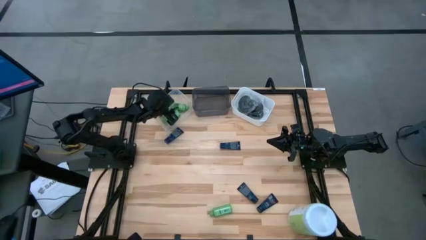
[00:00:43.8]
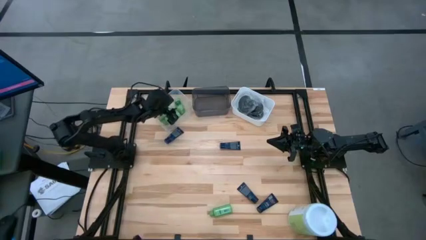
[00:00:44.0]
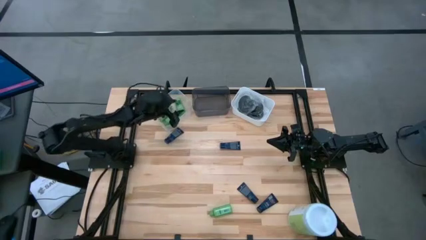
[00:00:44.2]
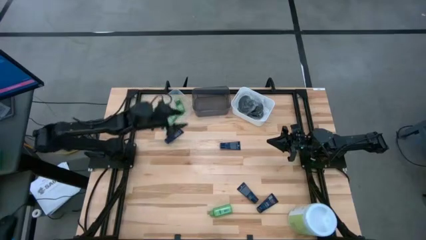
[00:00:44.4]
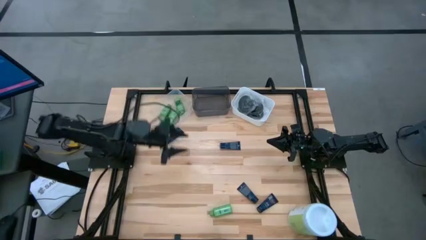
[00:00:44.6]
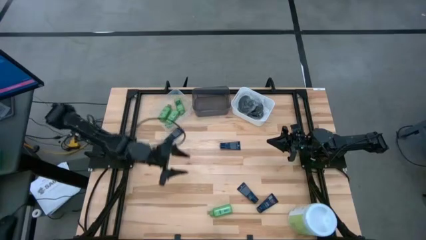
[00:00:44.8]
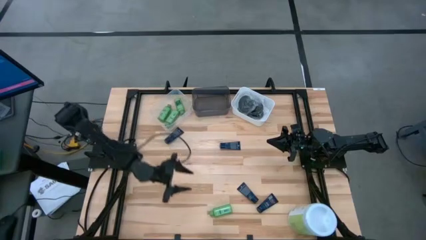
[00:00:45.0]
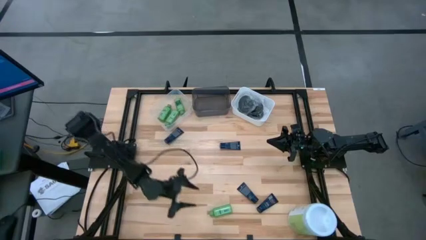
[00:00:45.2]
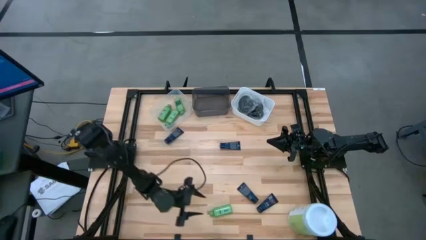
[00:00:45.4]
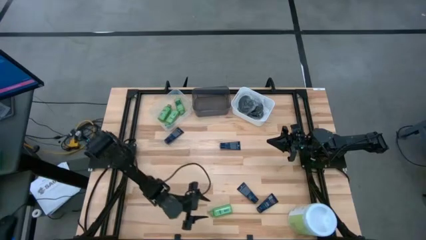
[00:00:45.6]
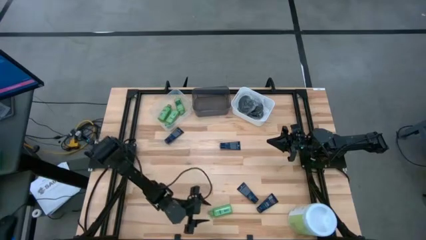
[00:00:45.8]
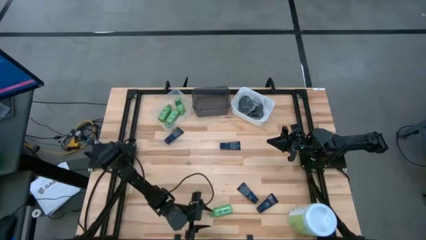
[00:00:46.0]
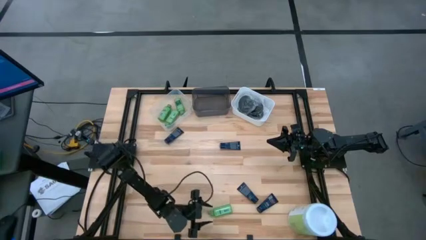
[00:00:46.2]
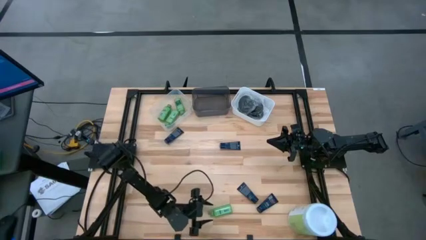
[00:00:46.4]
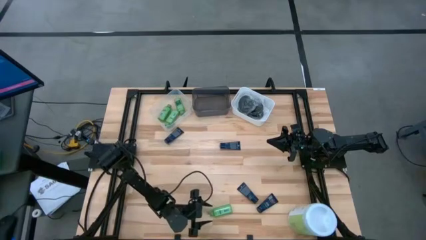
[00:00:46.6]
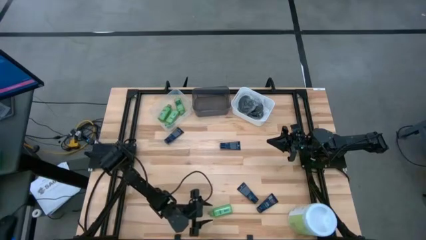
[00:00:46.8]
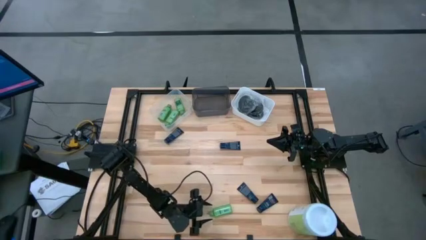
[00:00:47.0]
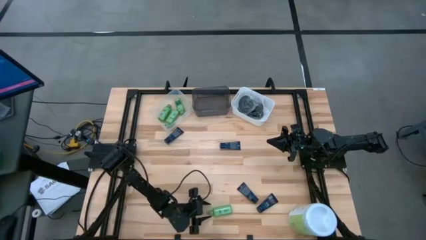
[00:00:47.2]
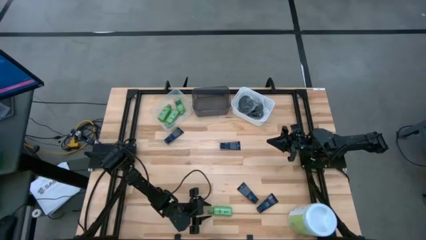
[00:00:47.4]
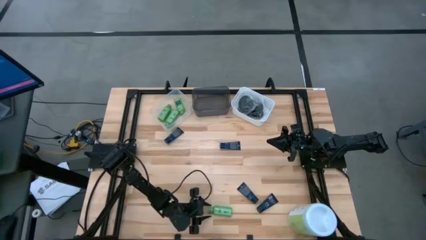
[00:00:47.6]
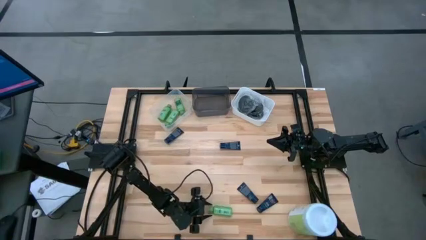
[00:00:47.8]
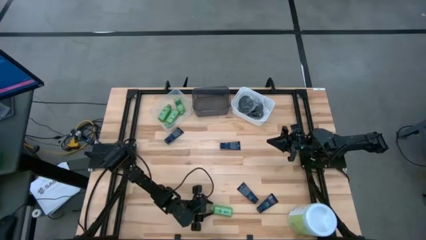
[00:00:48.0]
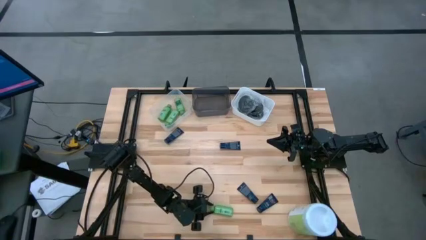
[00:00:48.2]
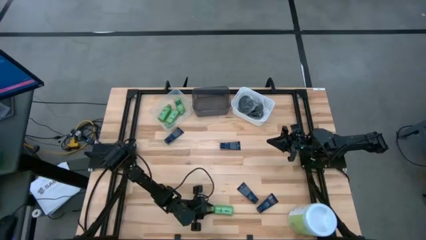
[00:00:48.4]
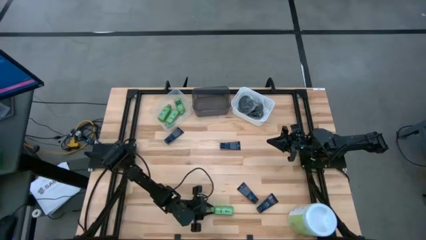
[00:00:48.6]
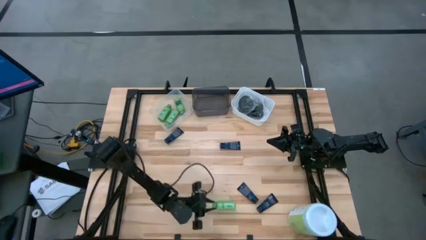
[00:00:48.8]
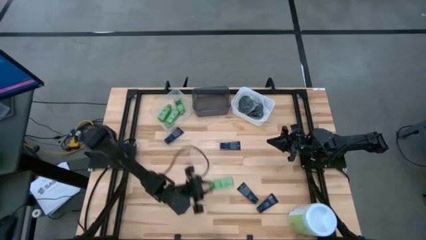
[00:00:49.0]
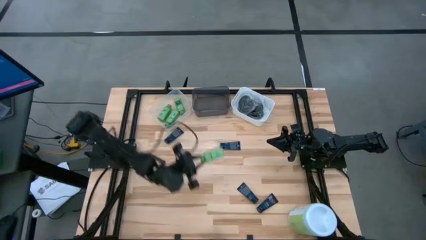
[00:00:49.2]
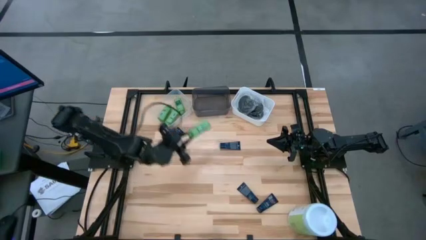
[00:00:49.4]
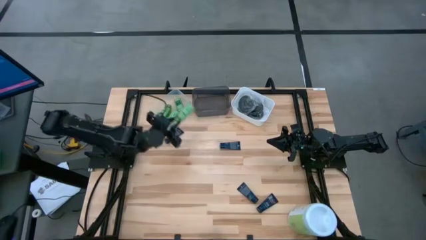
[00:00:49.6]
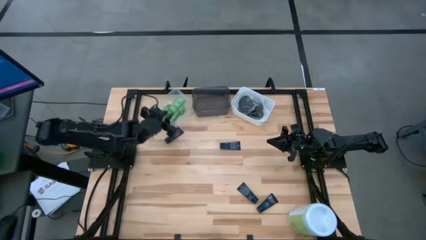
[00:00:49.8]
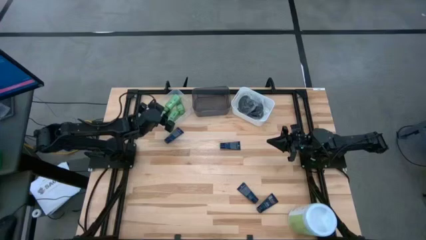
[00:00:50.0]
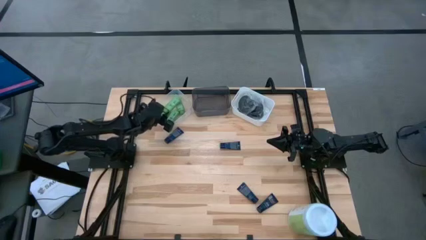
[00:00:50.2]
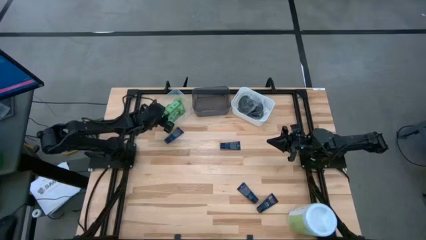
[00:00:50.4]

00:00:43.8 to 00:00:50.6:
Task: Pick & Place Travel size toiletries
Put the green shampoo into the transparent bin

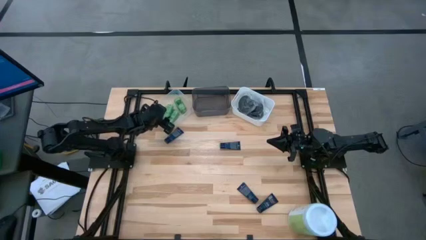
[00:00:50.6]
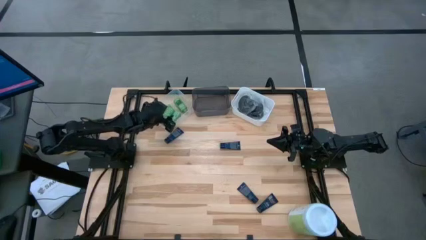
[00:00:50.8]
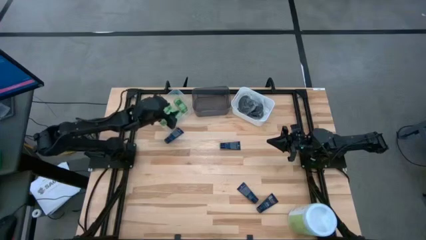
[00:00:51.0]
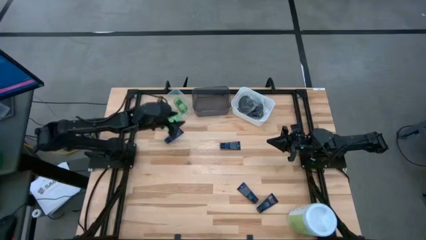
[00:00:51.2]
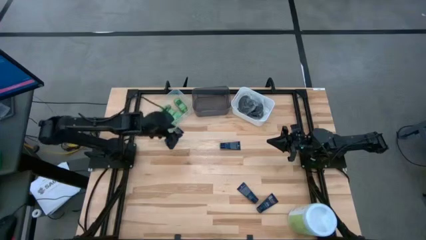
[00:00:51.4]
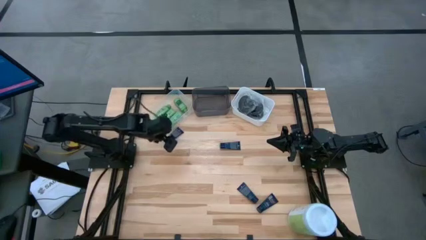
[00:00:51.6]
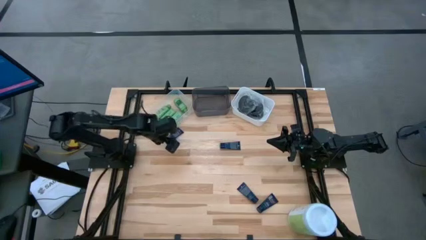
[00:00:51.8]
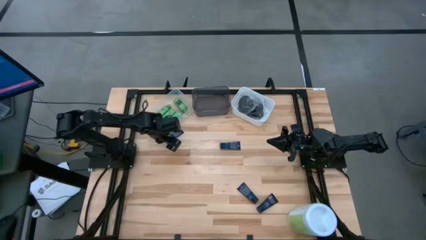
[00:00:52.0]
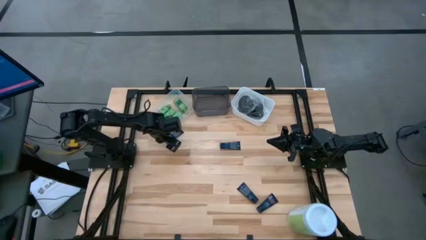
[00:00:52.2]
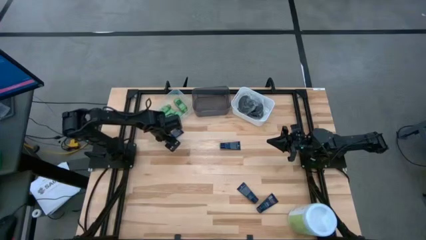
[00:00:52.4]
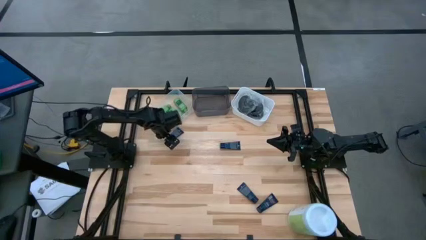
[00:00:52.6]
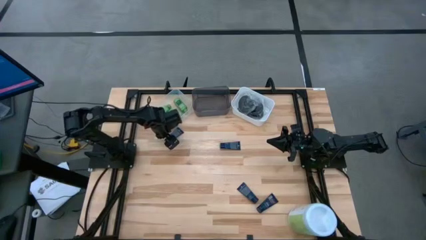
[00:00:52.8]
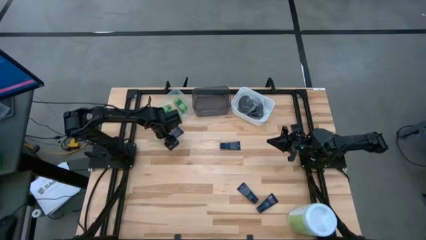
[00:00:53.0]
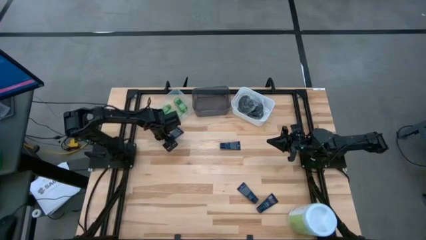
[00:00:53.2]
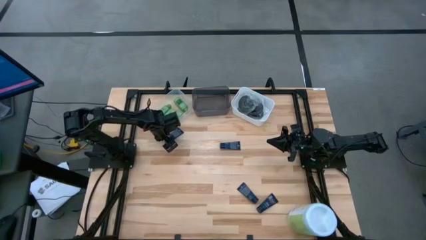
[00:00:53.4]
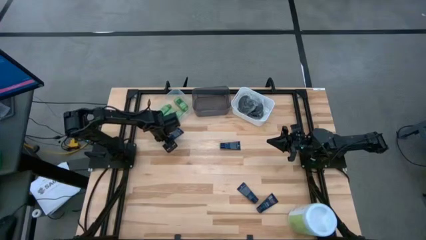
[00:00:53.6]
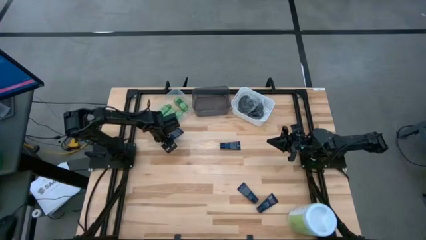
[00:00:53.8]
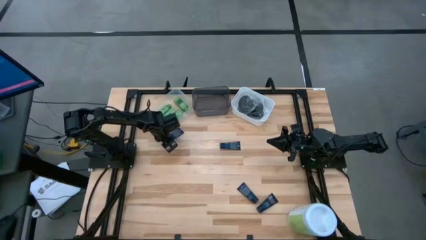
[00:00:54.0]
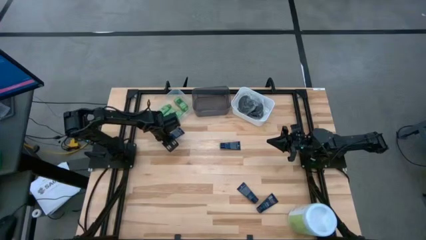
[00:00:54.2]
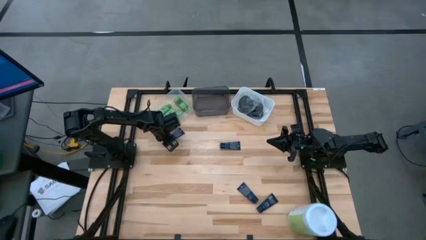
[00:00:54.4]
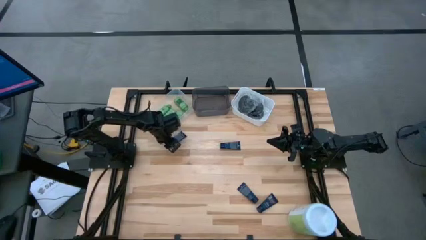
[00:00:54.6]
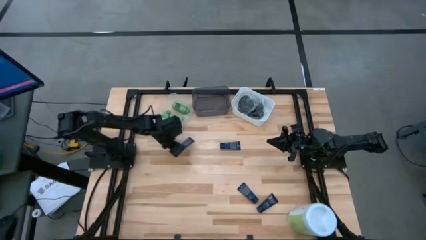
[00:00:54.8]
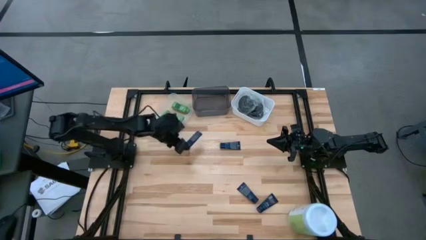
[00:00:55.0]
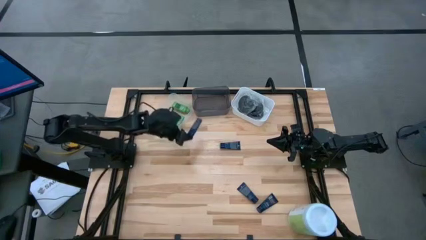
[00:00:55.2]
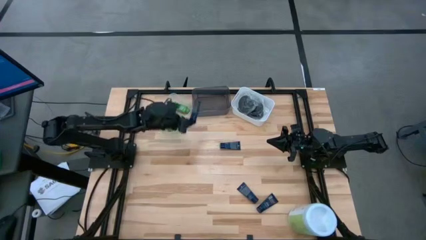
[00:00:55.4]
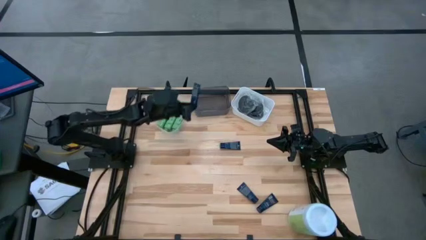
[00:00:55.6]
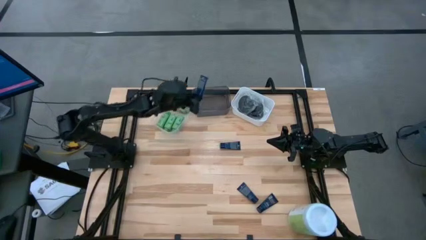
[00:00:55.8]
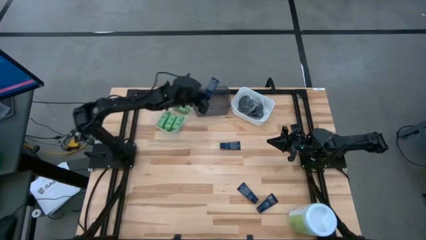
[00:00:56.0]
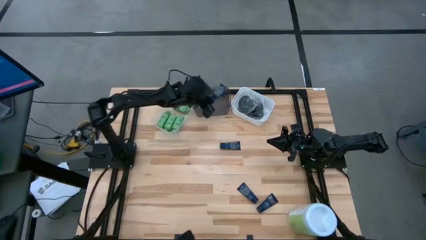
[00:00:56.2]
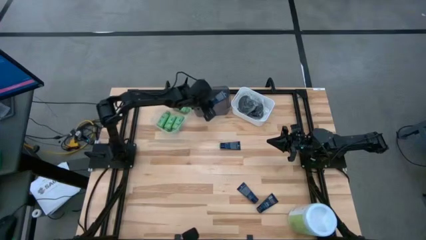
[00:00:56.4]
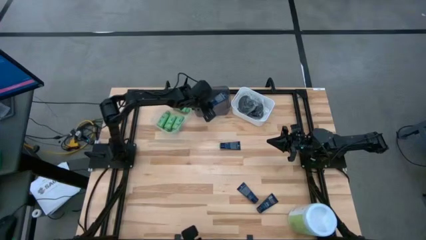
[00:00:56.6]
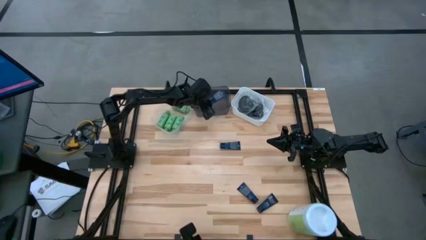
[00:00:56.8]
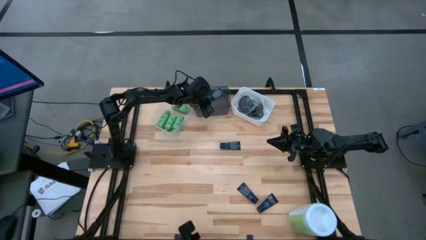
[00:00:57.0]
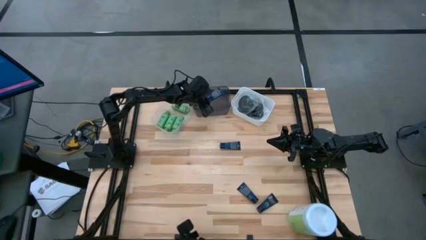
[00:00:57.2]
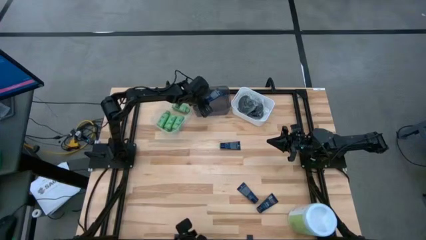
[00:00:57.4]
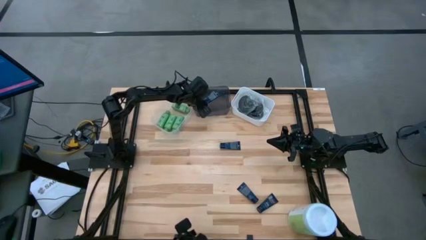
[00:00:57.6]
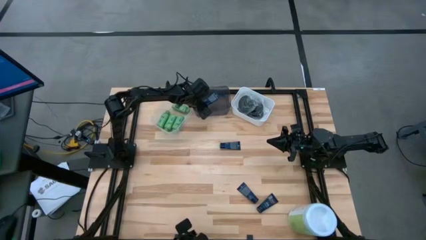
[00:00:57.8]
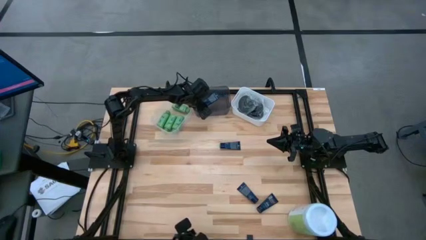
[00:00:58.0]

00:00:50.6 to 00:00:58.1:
Put the blue shave cream into the black bin

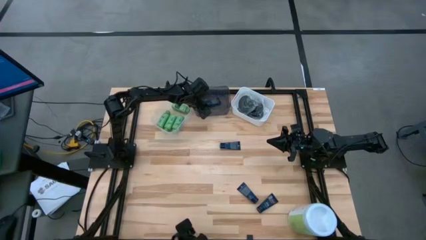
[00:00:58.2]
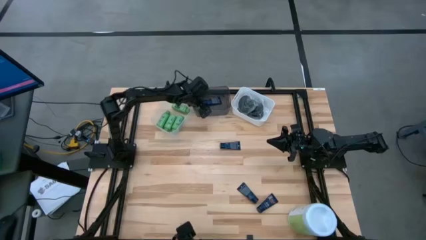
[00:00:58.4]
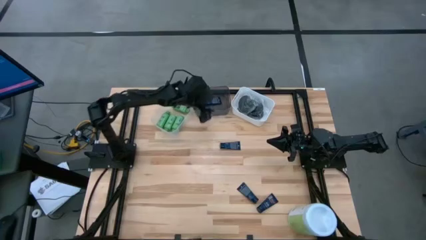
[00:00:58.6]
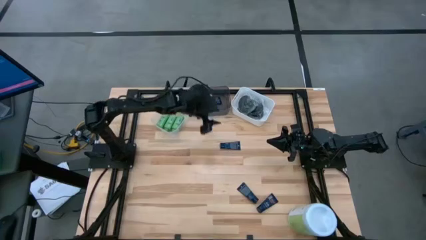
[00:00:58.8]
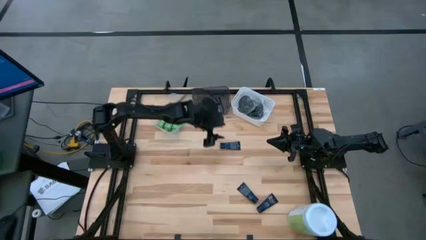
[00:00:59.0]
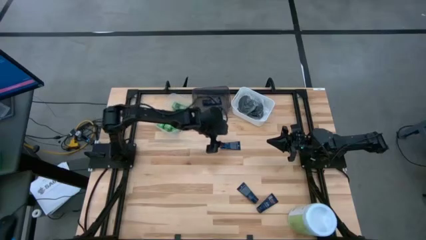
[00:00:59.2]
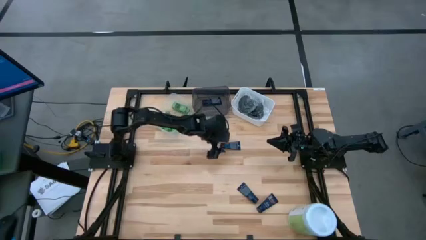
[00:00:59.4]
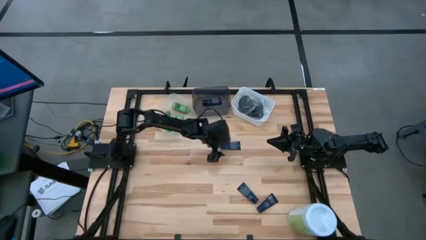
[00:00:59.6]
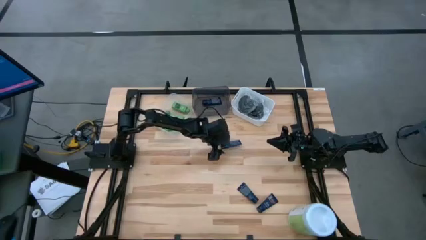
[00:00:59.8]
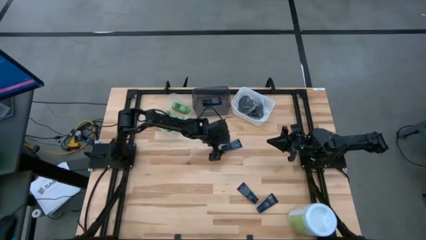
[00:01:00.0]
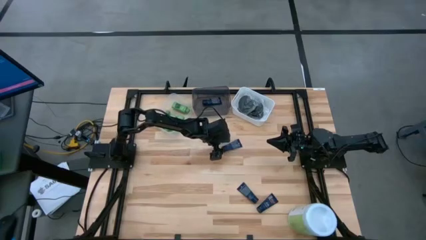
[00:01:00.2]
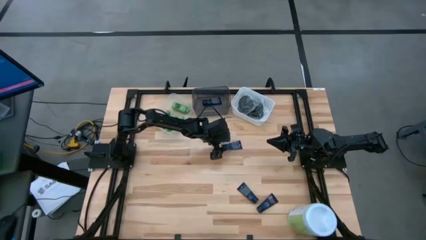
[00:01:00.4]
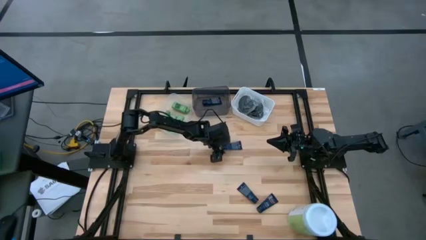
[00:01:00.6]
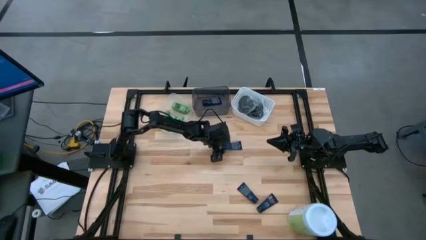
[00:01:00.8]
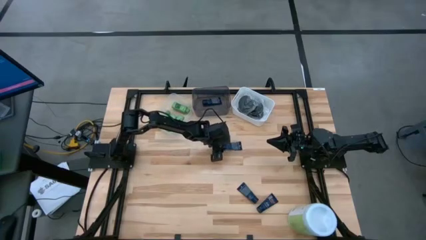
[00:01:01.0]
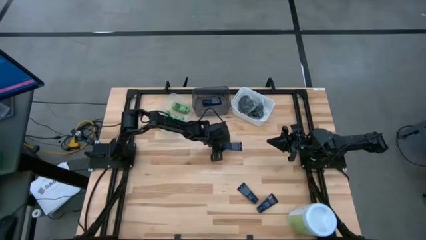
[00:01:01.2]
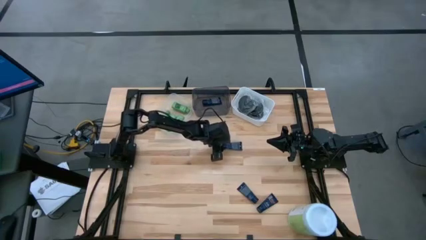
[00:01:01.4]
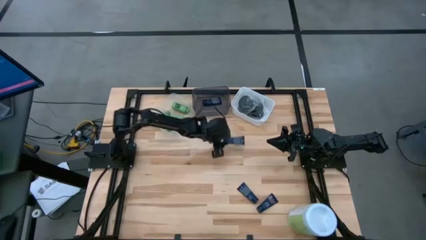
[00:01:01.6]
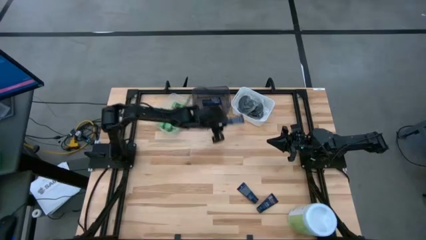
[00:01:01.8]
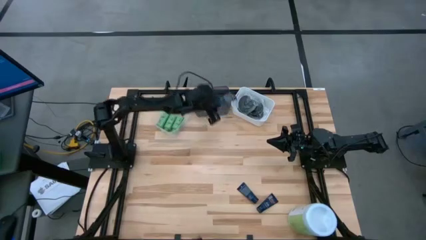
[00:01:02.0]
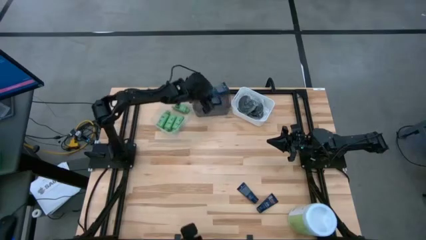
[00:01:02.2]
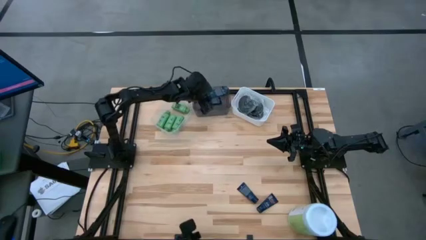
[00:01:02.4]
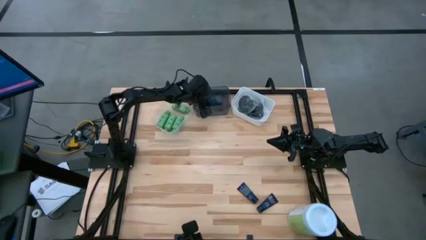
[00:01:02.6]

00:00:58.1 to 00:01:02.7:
Put the blue shave cream into the black bin
